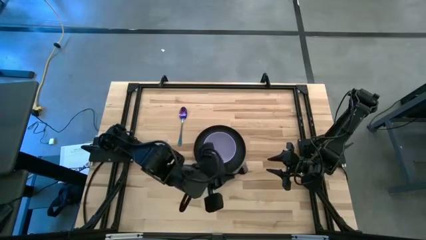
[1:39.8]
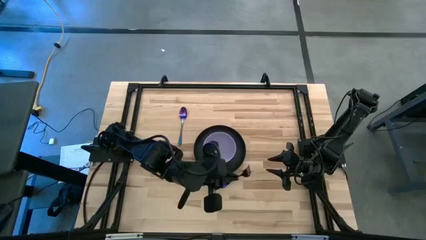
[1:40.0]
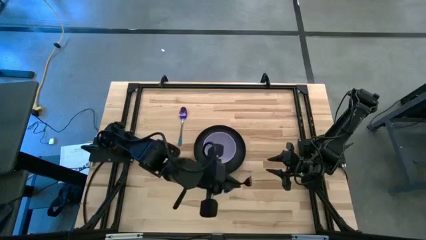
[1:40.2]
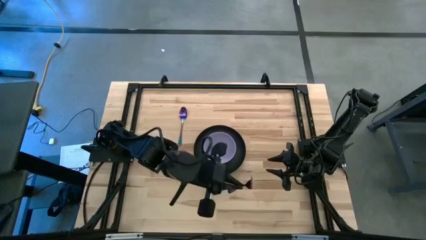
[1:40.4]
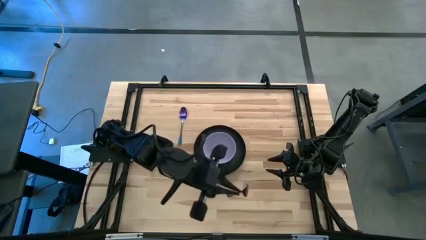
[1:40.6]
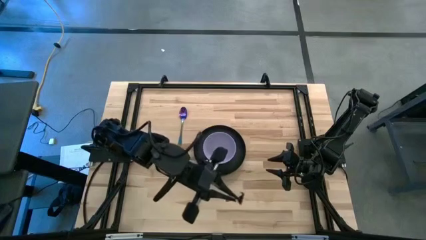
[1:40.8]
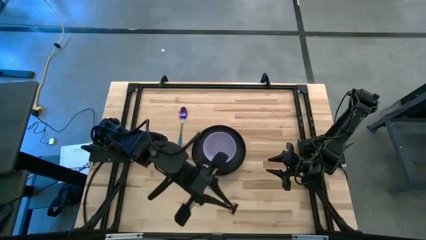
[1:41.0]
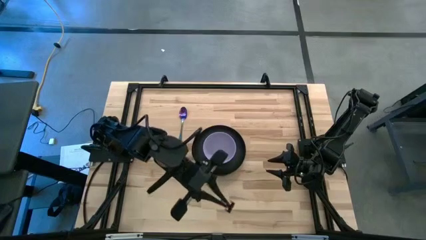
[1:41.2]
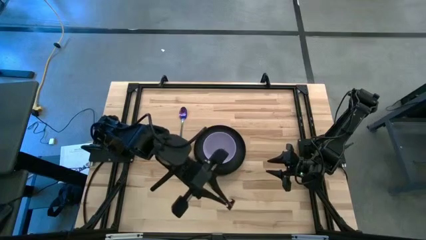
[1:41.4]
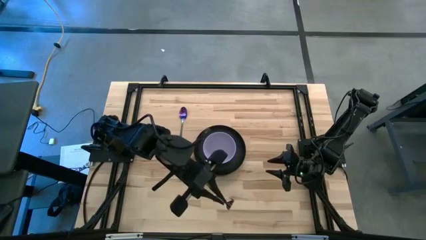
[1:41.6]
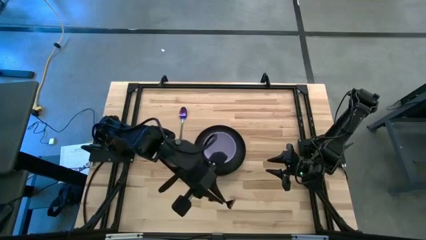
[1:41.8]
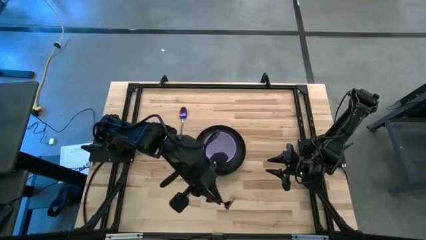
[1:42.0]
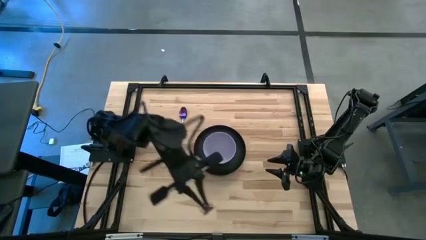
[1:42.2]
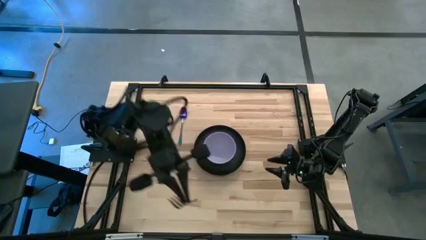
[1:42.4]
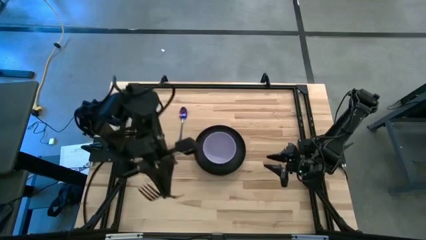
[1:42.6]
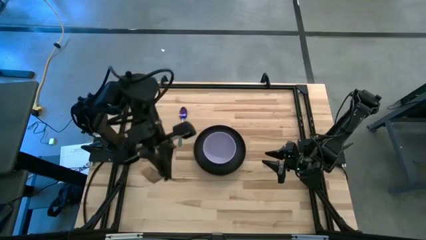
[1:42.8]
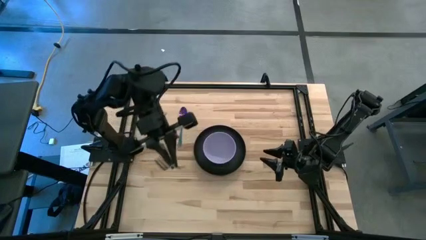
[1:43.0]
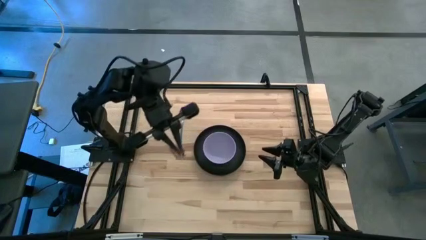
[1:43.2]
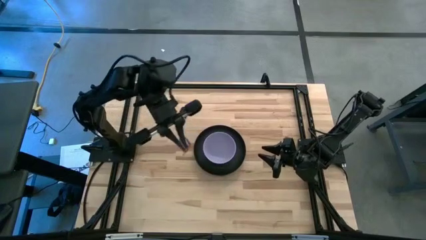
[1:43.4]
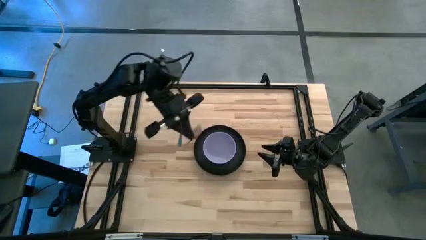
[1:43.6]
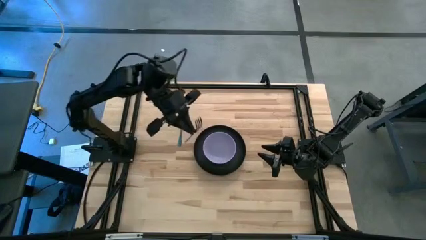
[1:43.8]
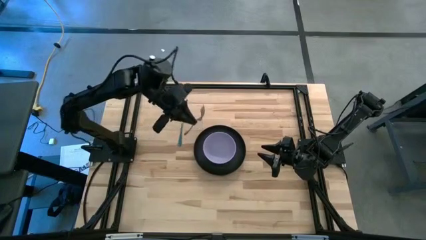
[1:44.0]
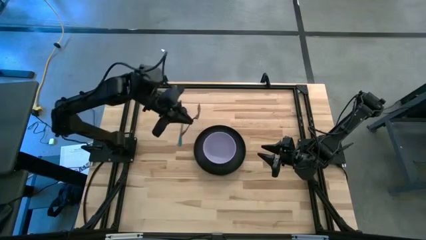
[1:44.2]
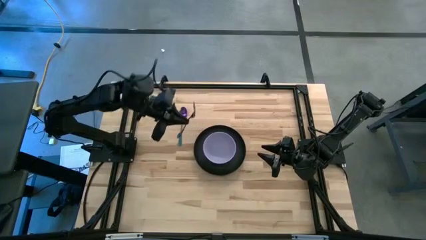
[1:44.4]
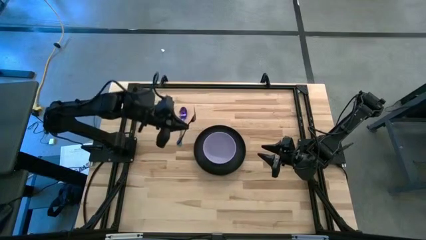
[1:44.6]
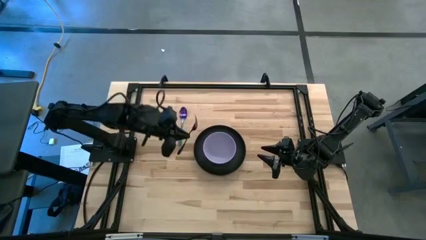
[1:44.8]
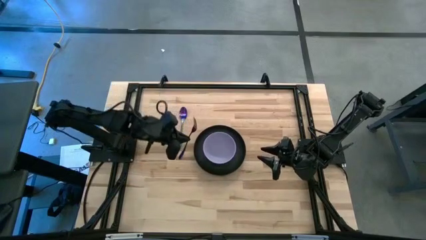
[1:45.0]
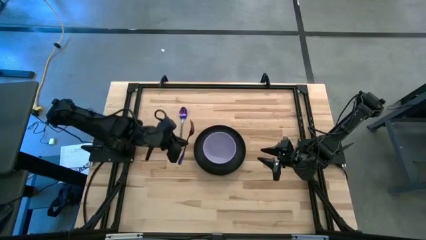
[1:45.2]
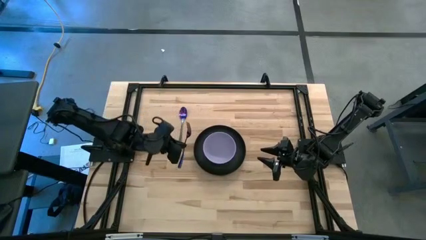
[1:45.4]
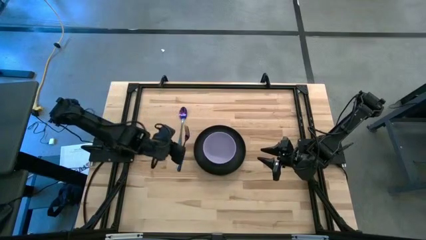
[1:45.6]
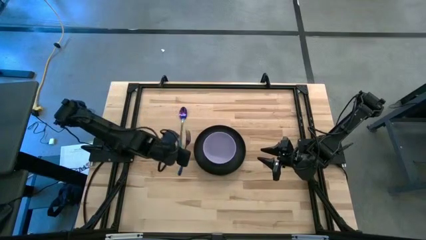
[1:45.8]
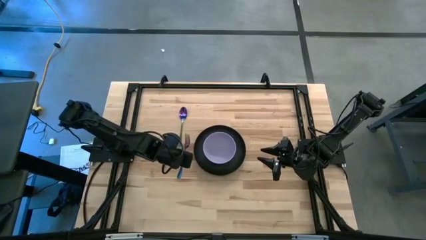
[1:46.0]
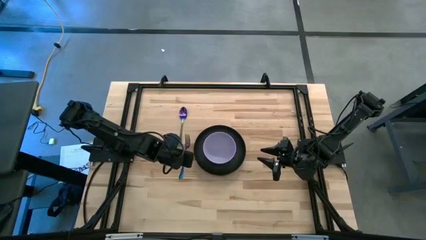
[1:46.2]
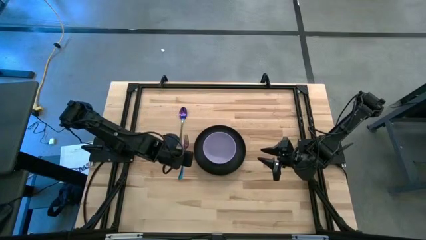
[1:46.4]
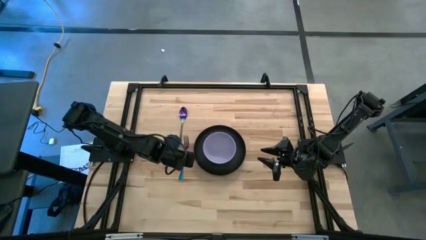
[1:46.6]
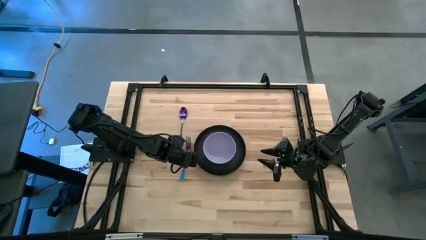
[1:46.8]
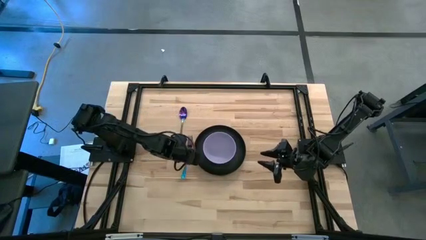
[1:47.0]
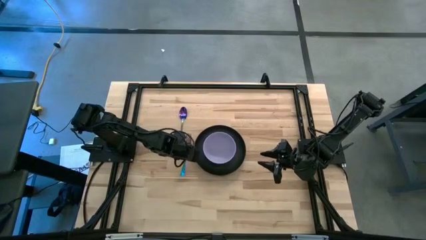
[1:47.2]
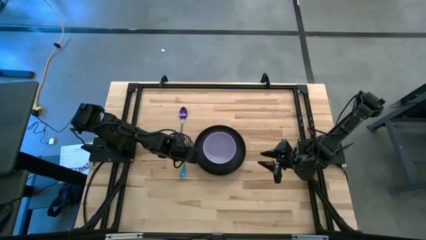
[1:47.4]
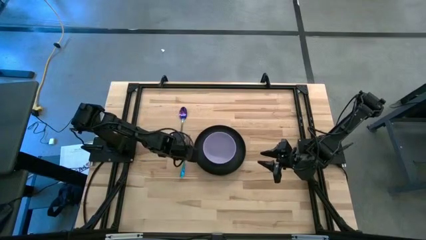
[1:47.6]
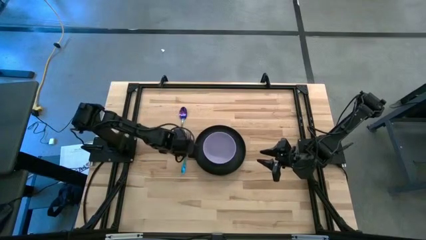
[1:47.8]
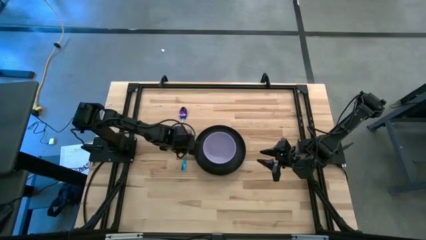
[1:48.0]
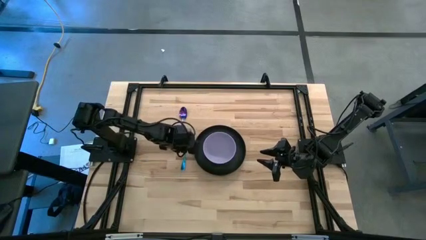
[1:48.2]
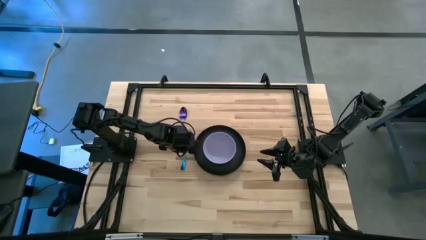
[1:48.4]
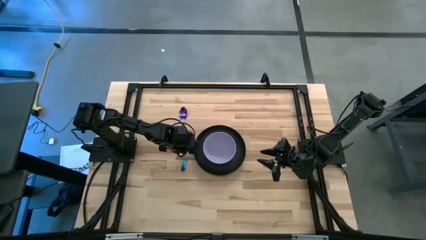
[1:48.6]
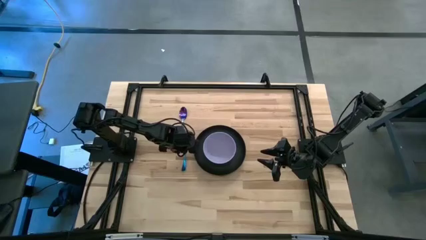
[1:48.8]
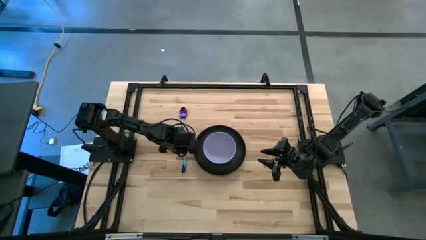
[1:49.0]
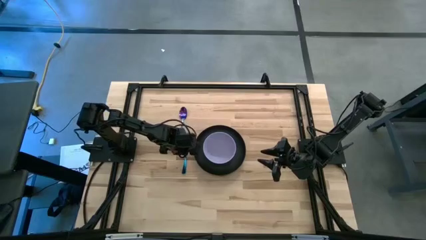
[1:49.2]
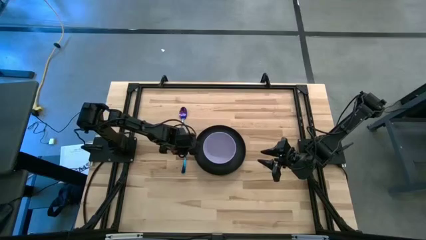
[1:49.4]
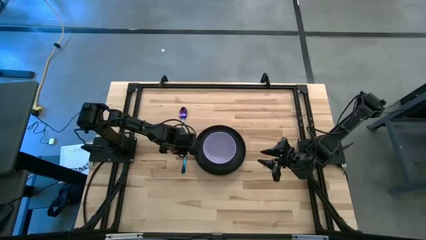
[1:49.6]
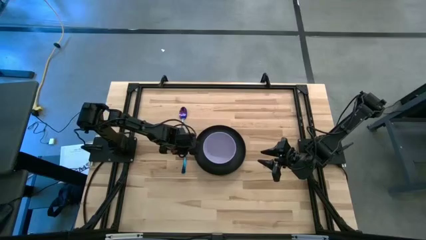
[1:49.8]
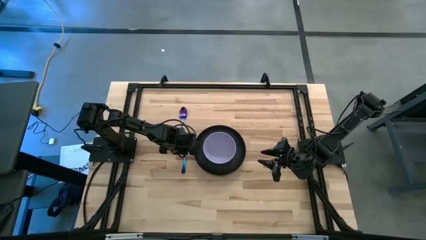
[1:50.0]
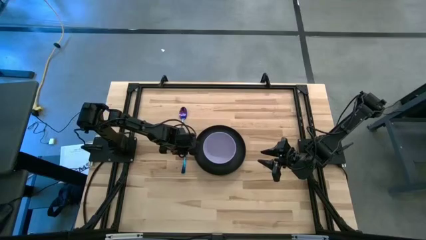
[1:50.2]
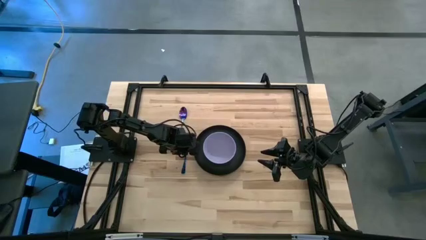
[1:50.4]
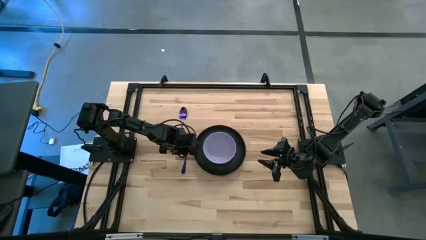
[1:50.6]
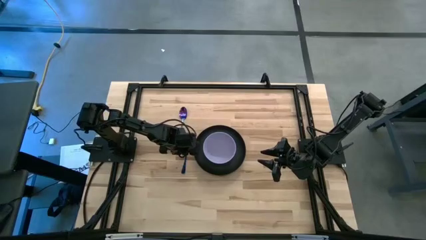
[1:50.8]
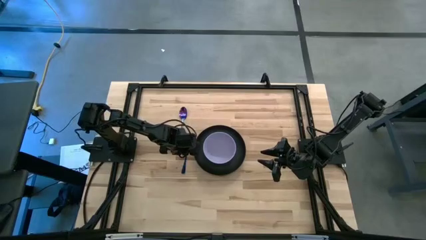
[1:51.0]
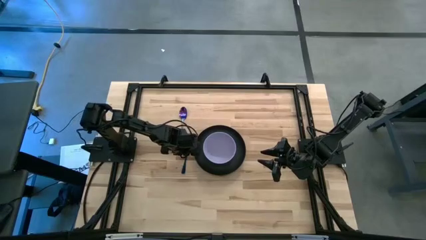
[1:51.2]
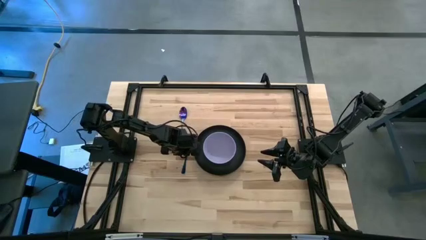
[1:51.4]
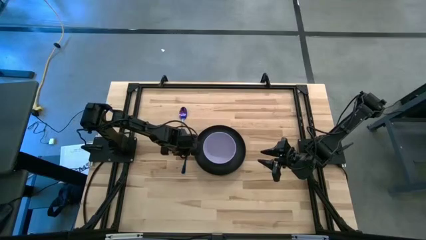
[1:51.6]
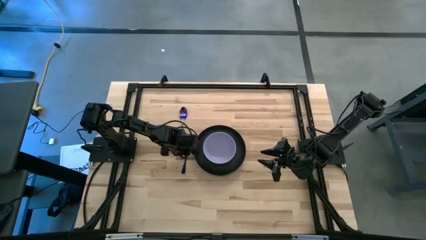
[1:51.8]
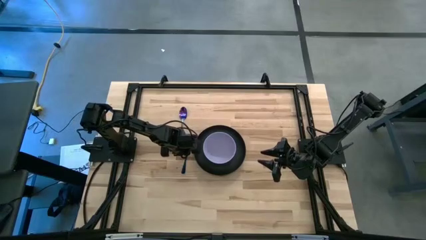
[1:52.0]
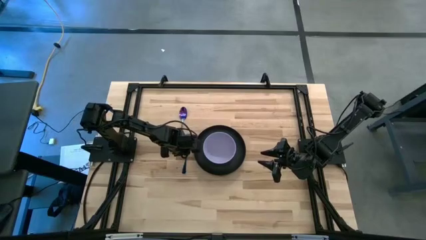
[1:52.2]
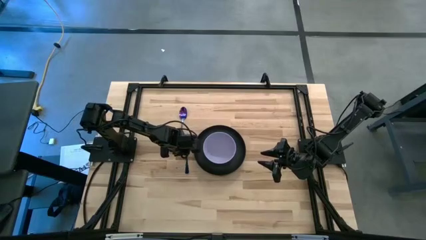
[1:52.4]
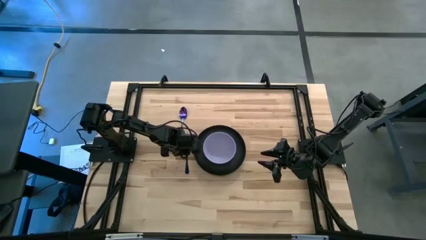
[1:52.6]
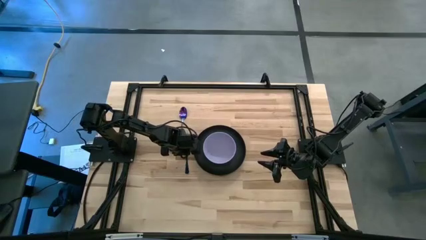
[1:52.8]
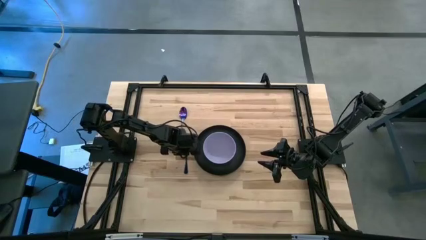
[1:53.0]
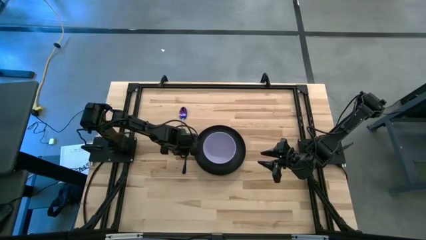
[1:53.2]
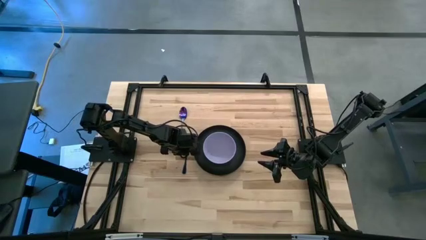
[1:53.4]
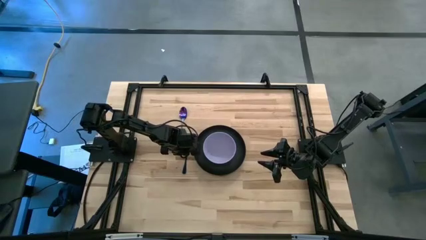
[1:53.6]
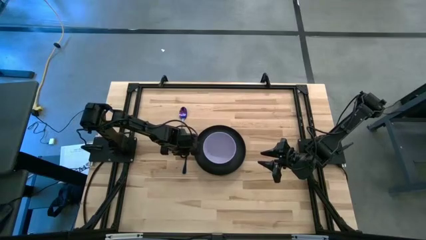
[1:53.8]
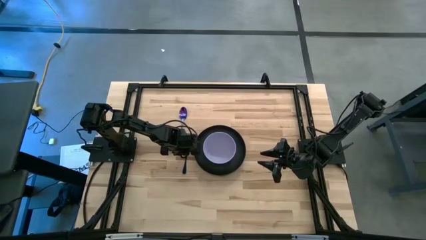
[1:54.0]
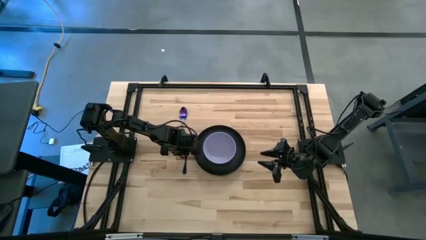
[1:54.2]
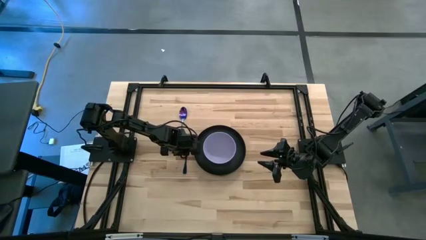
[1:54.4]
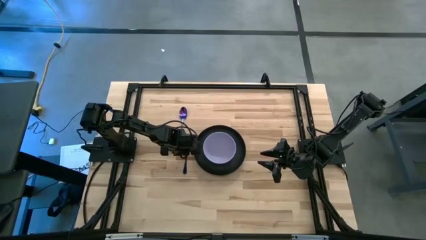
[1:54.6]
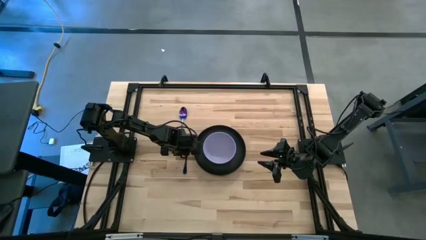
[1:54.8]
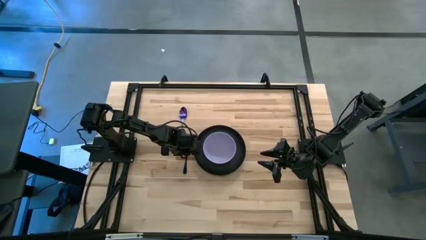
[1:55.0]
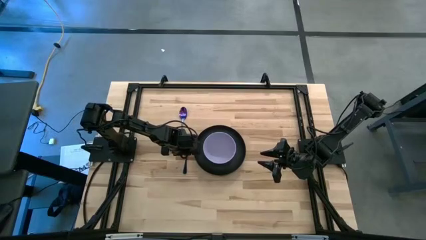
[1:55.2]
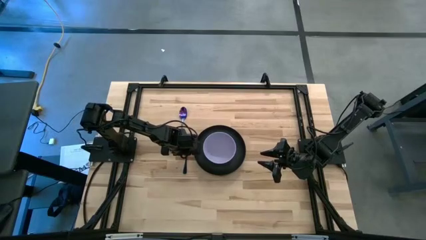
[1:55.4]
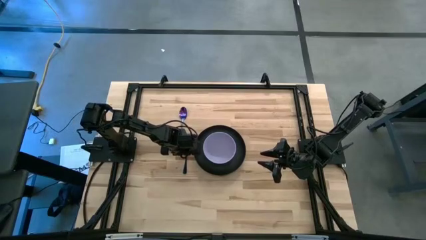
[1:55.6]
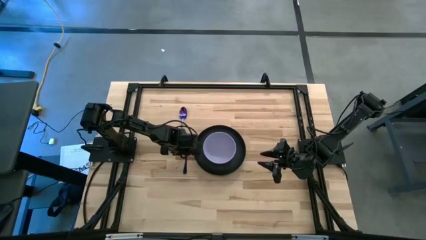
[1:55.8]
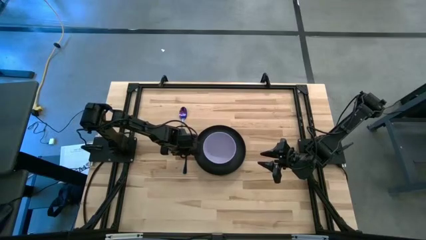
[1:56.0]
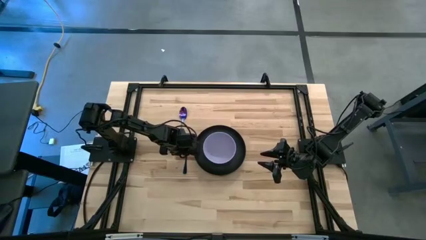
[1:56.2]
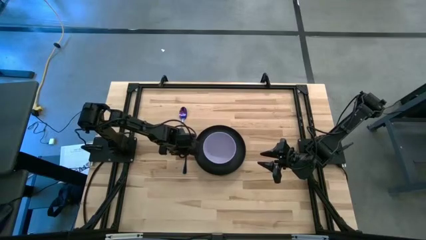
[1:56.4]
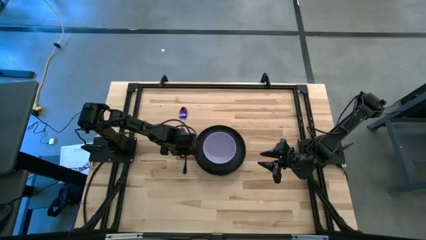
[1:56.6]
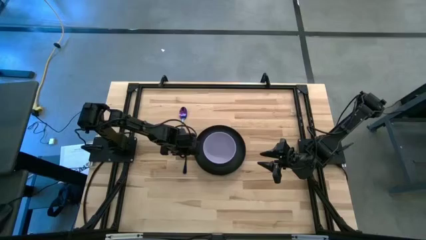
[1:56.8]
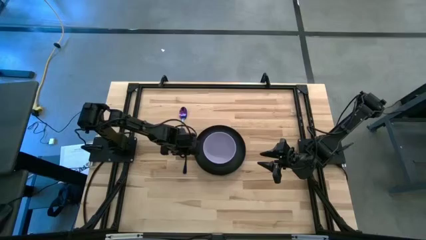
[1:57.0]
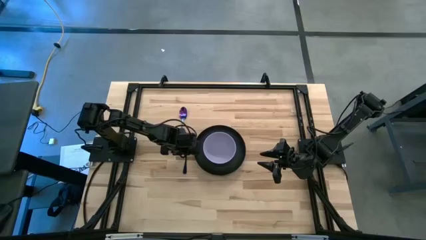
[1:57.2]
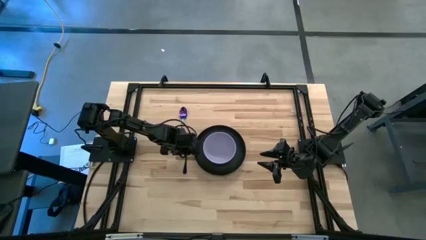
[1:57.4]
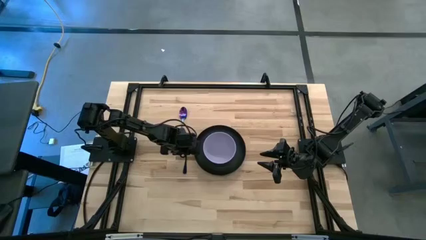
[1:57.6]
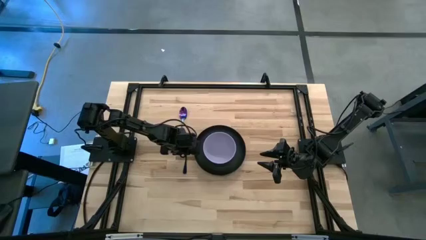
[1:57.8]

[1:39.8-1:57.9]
Task: Set table place
Move the fork to the left side of the black plate
